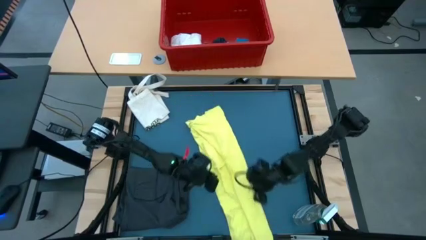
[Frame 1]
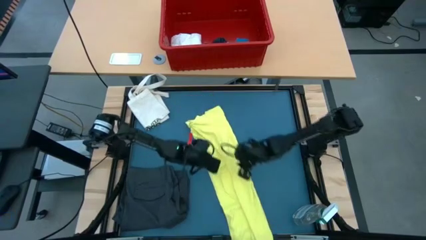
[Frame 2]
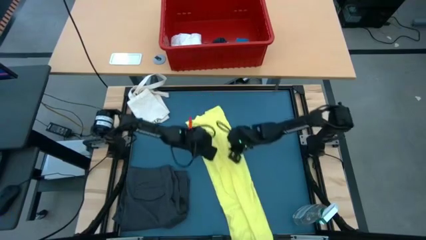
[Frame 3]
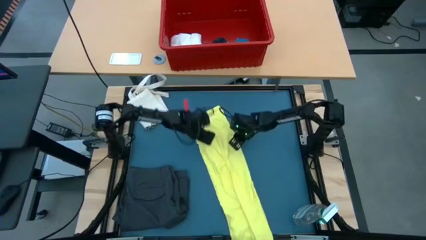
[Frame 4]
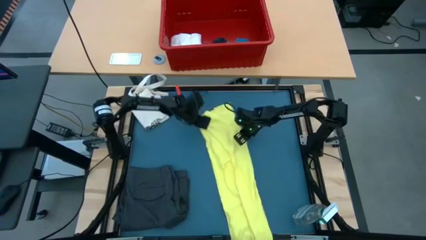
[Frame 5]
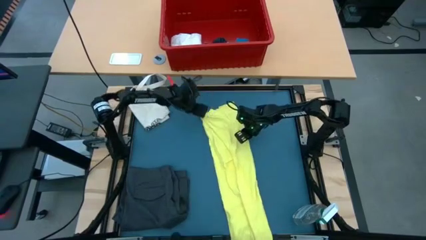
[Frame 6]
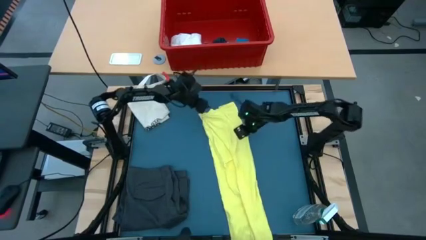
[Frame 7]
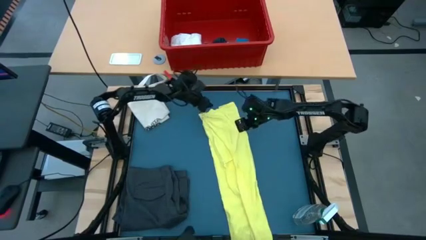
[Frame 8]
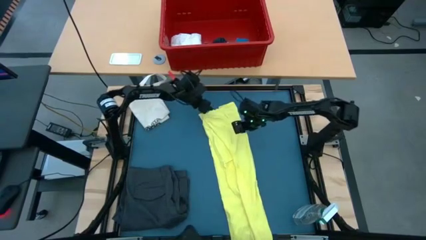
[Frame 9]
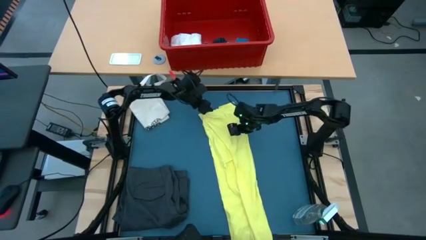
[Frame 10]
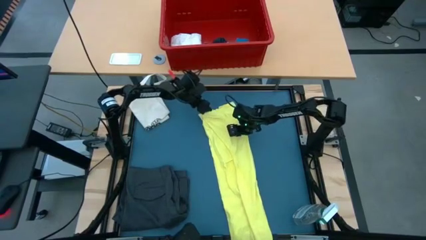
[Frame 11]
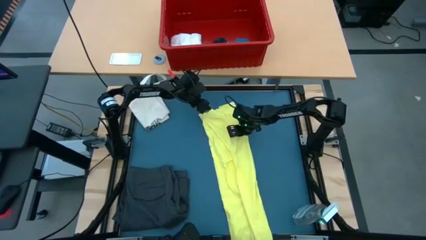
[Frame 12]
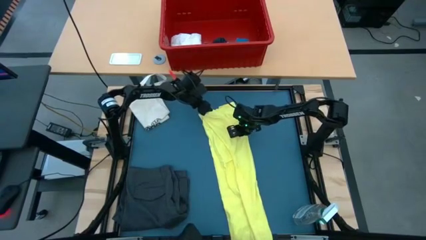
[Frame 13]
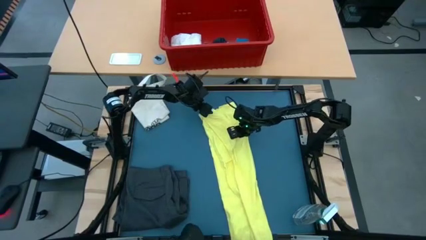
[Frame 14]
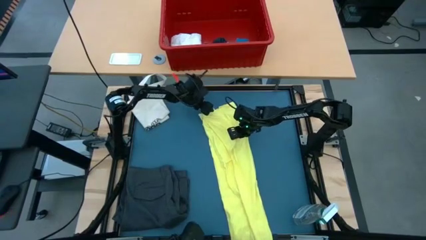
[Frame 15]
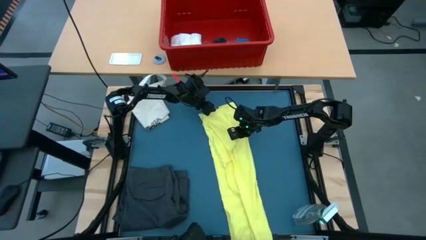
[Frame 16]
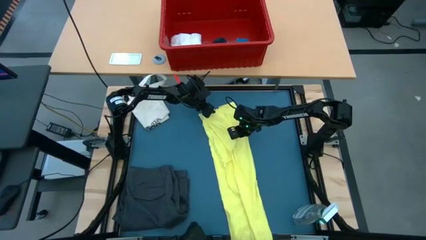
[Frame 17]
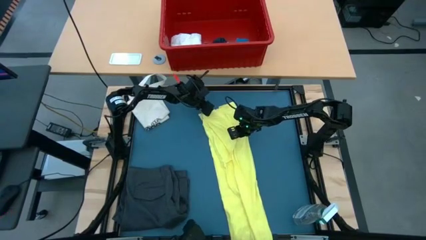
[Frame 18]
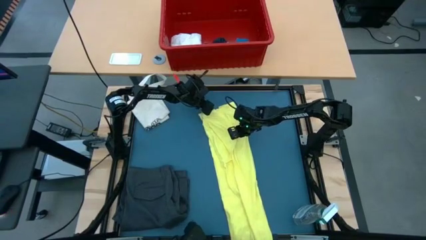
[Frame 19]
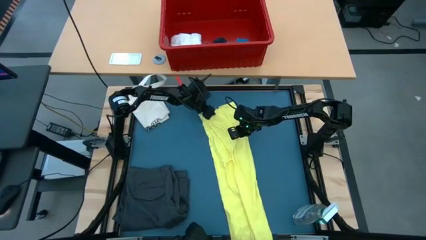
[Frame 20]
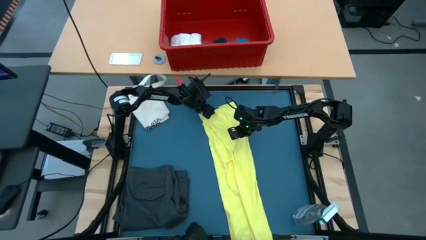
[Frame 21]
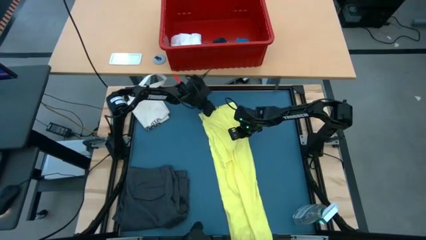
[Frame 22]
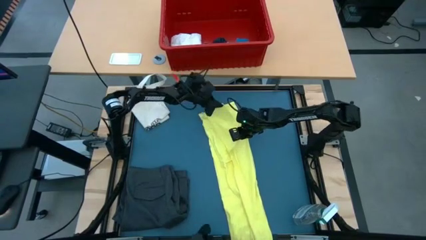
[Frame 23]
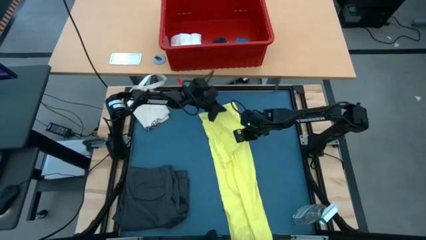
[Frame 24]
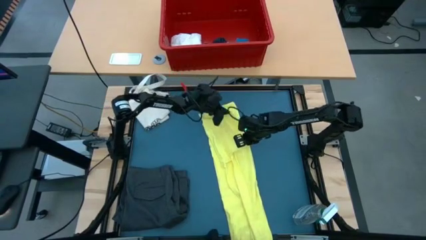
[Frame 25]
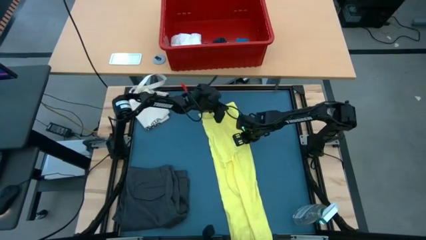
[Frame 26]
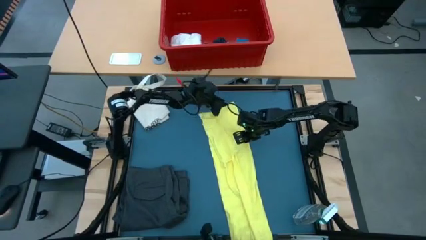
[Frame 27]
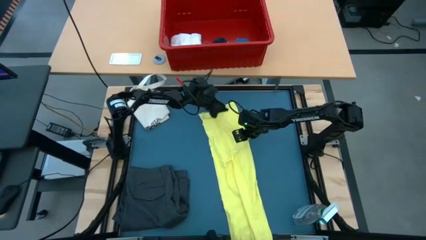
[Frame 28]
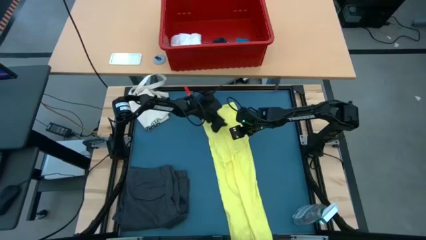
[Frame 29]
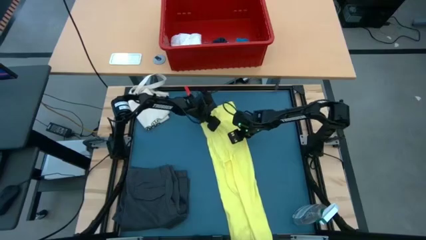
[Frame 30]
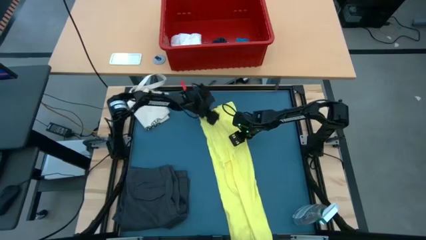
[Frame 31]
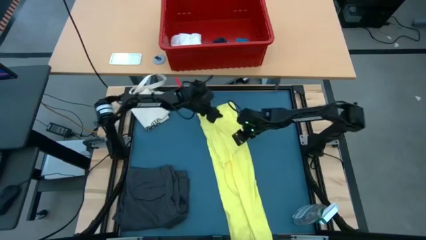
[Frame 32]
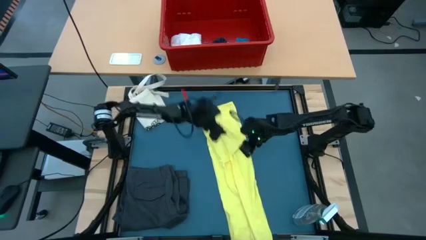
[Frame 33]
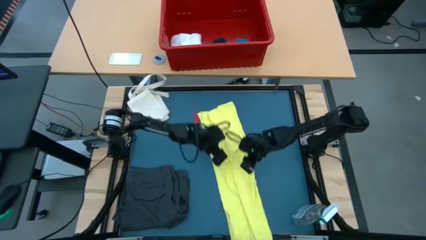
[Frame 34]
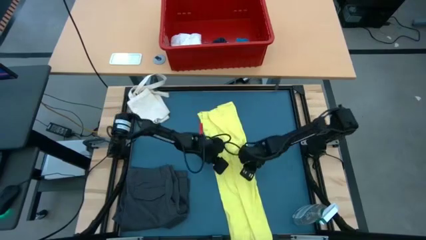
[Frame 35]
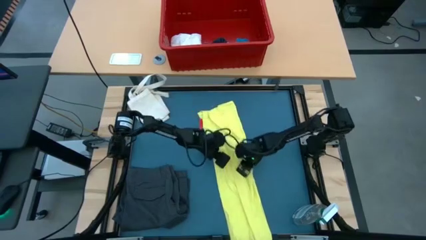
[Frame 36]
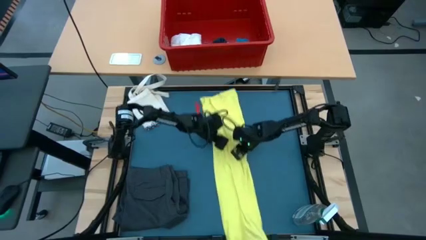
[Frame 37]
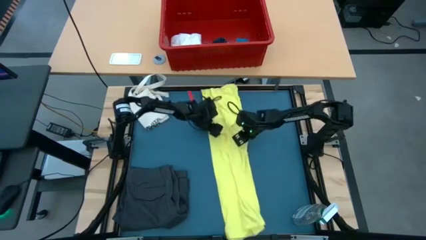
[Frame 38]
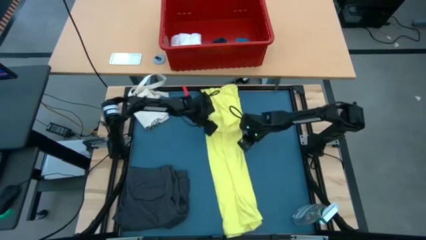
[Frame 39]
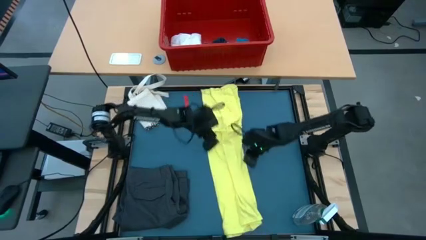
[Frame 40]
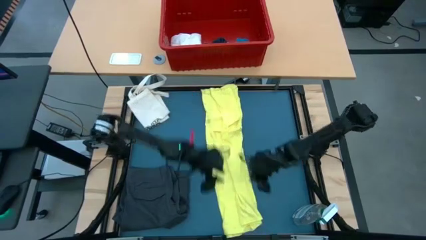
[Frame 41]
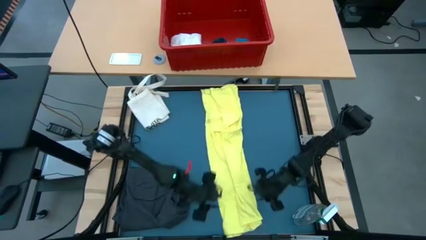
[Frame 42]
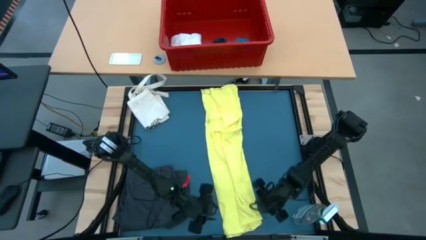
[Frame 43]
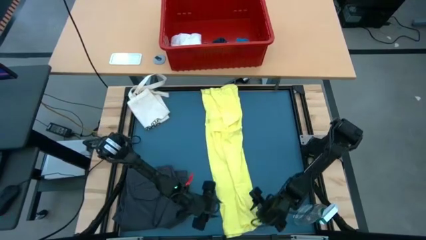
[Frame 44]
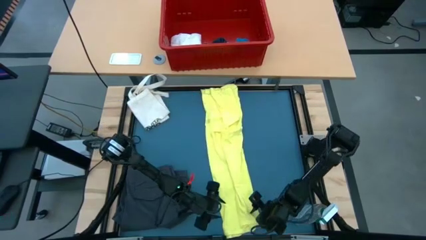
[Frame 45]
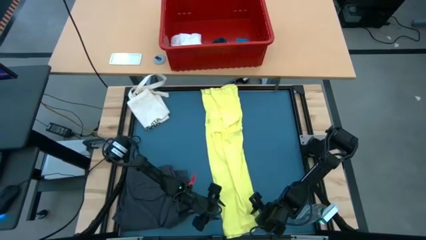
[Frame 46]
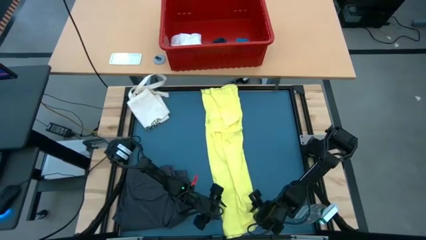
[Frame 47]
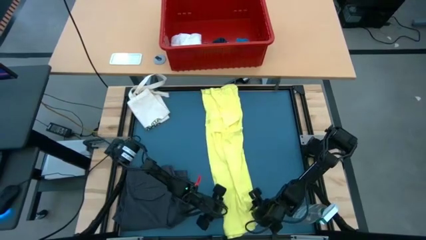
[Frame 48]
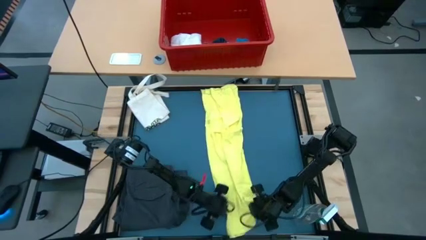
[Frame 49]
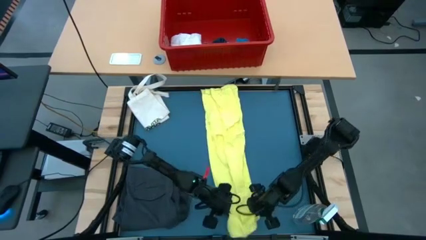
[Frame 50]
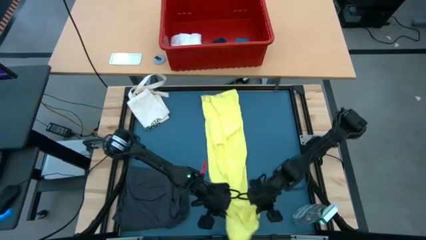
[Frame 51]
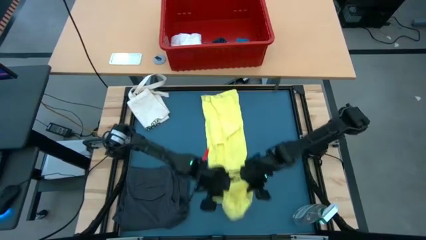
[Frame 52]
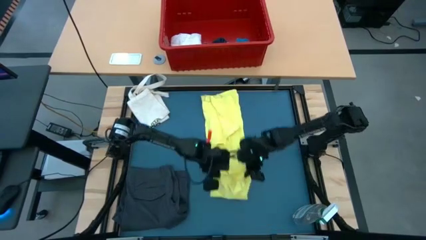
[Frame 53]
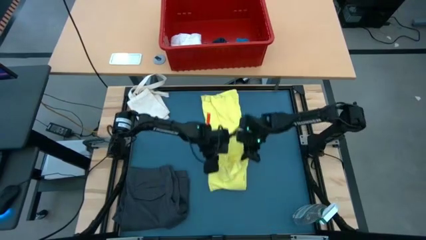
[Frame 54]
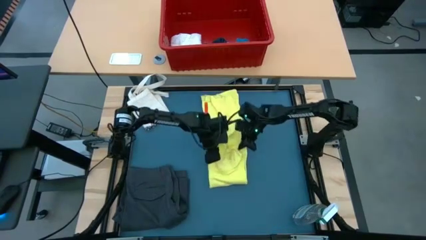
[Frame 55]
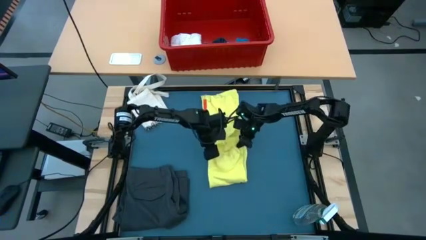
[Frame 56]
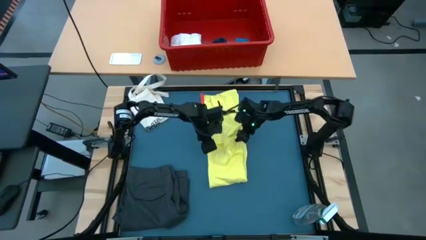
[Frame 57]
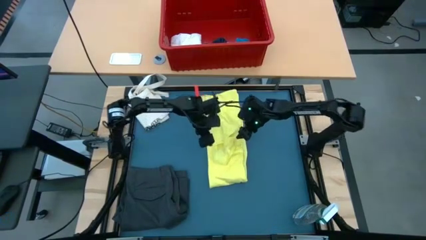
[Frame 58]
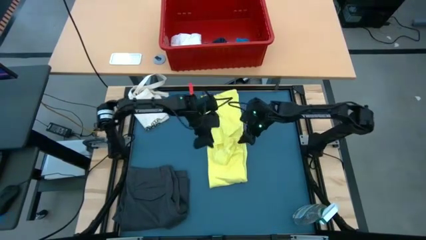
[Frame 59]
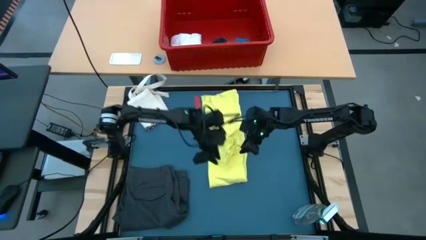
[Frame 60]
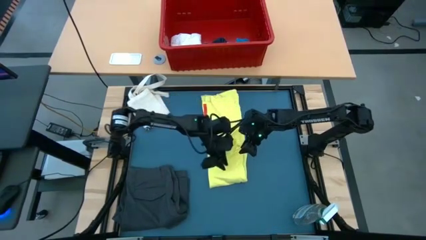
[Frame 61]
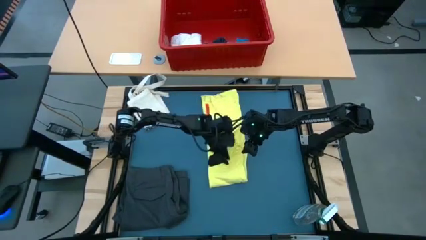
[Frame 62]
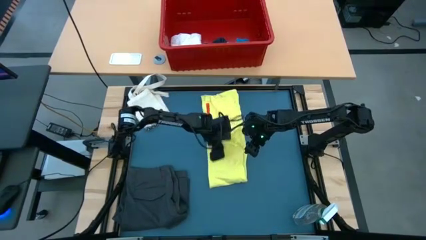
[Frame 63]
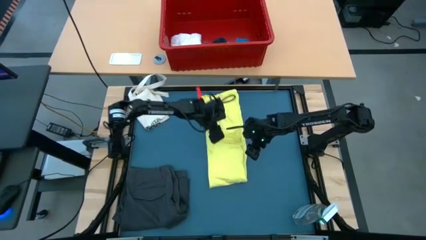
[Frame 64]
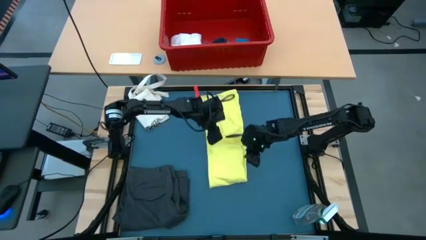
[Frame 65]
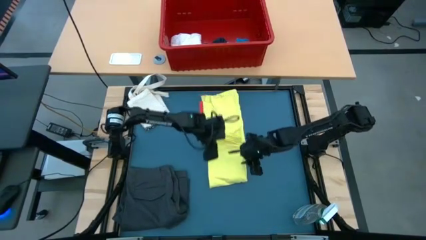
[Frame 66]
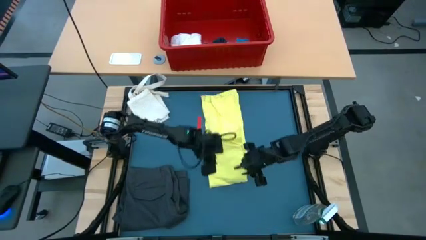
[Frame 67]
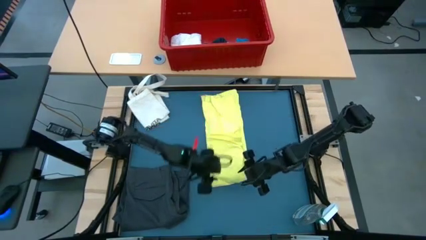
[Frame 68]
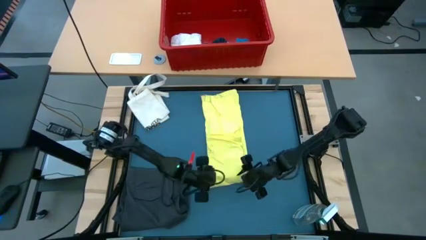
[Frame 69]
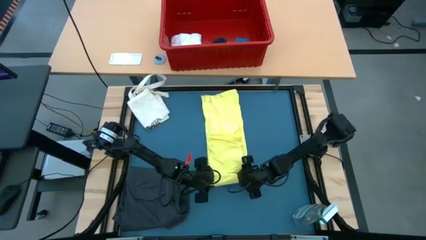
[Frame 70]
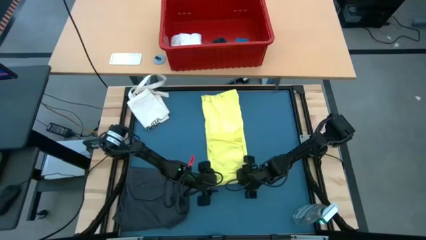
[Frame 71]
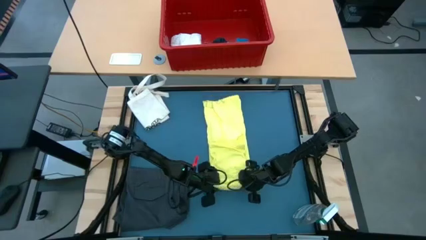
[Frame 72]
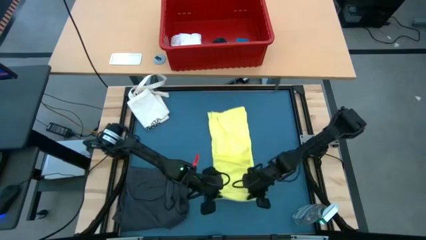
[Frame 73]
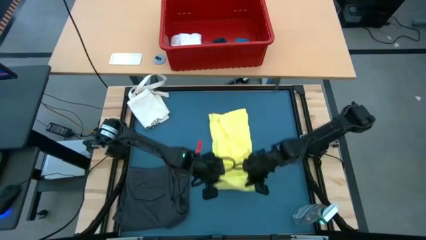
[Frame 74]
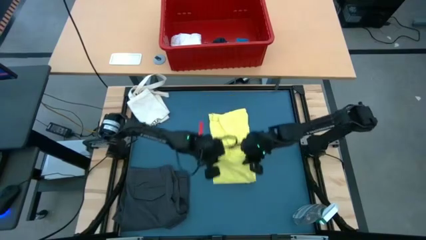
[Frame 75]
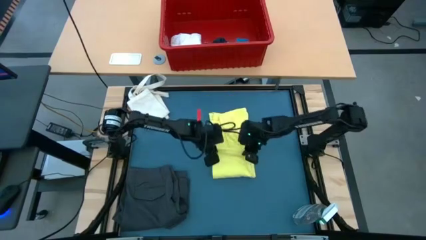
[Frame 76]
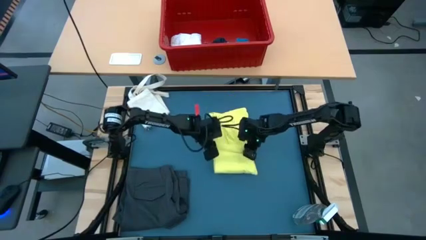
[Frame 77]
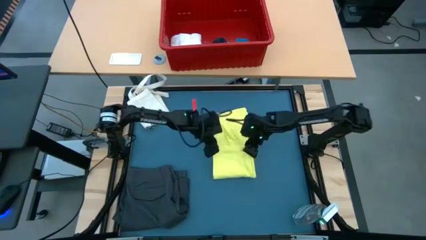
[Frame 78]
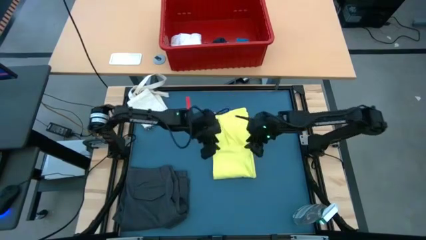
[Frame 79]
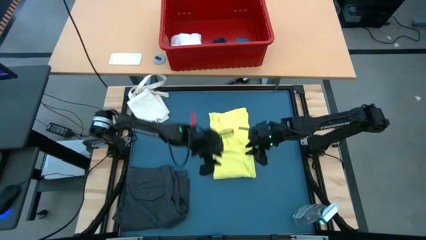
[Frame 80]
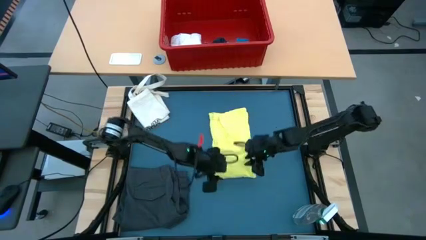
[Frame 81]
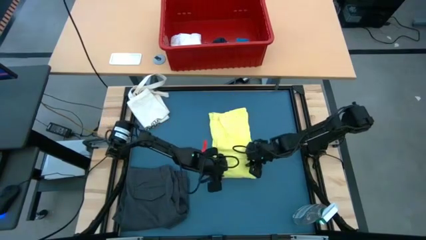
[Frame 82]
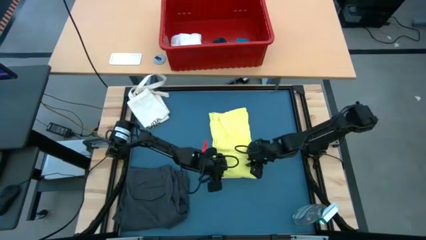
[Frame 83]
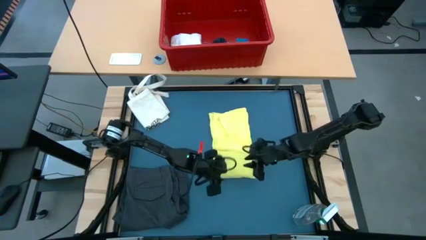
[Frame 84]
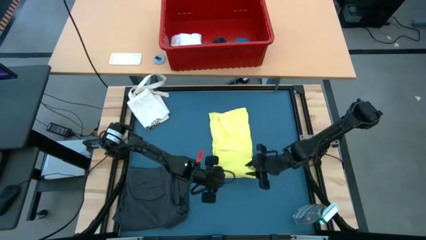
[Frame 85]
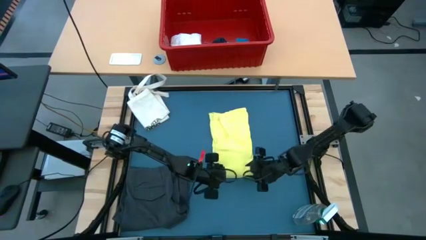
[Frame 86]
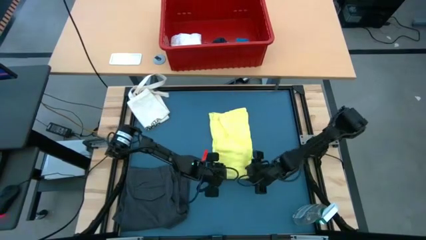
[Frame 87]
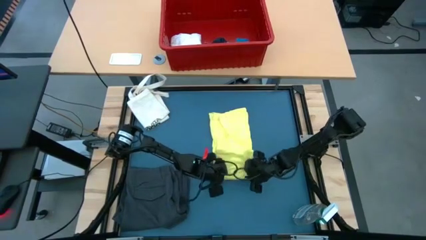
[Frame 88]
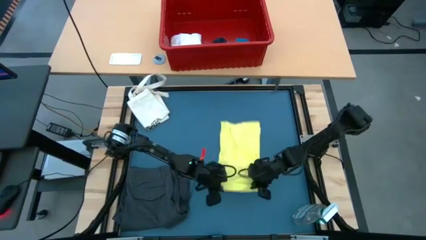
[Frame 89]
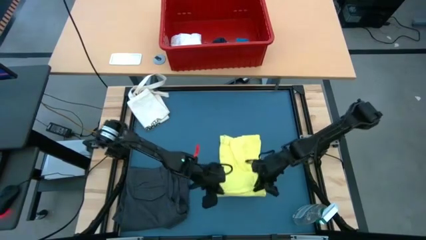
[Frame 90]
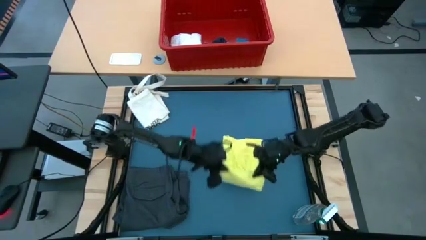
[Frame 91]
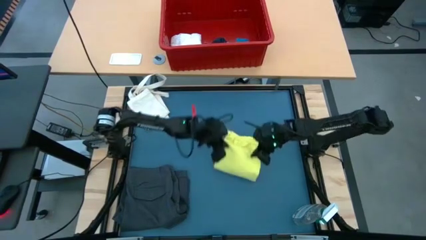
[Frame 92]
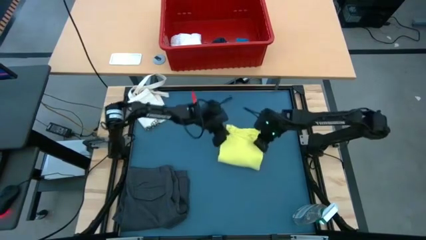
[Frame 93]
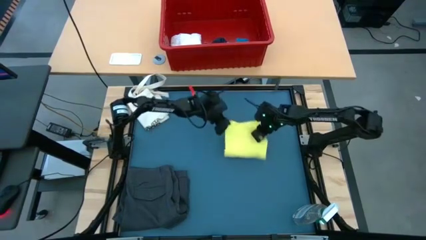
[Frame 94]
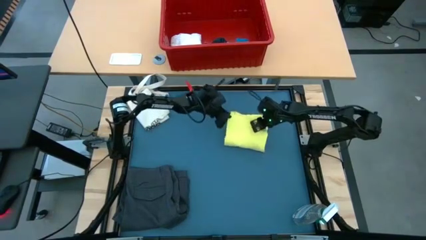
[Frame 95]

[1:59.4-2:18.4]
Task: Fold laundry
Fold the yellow shirt
